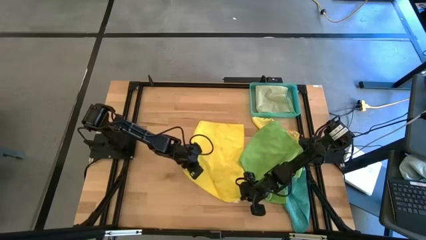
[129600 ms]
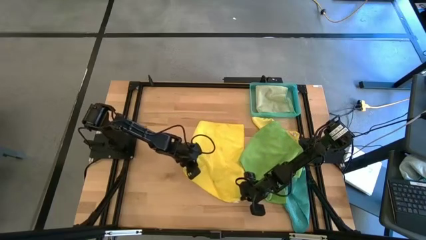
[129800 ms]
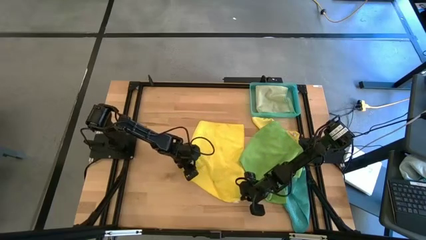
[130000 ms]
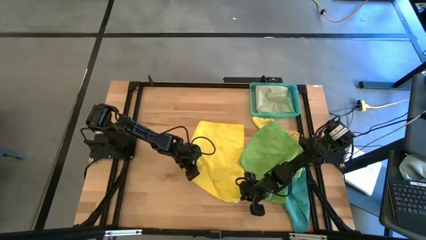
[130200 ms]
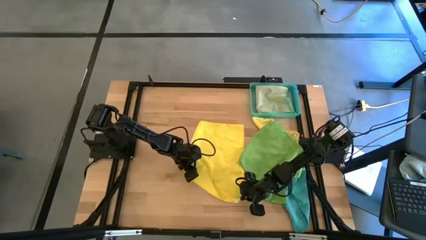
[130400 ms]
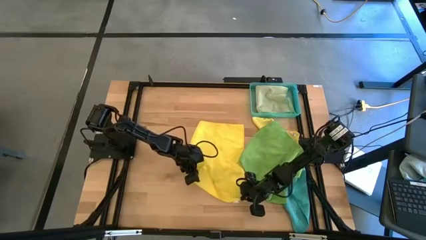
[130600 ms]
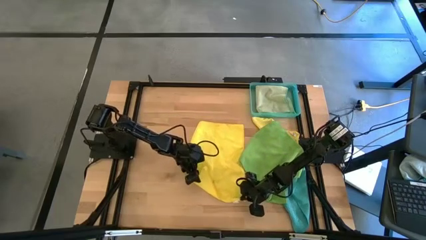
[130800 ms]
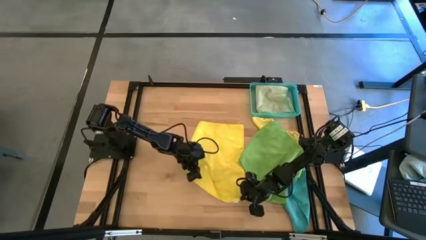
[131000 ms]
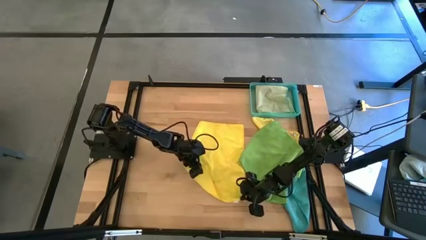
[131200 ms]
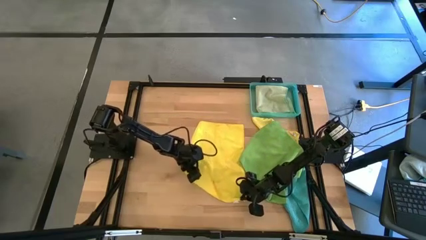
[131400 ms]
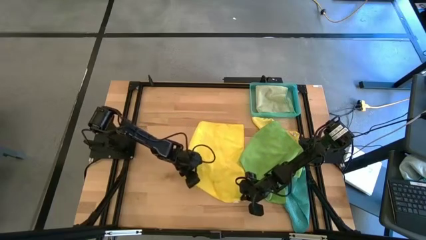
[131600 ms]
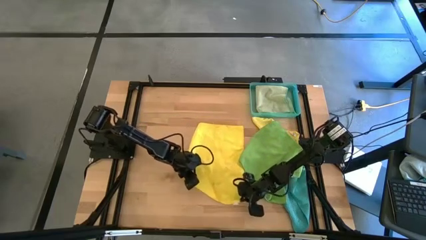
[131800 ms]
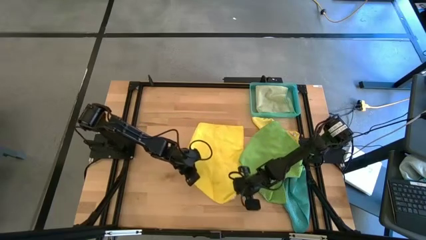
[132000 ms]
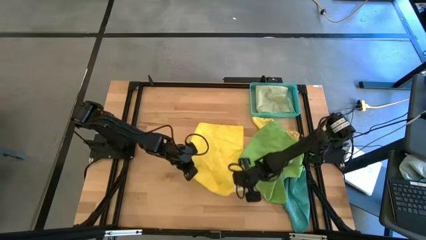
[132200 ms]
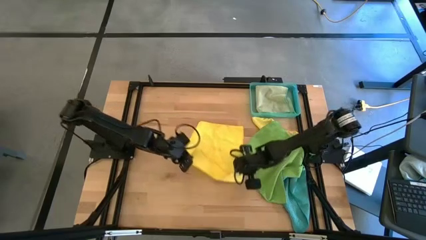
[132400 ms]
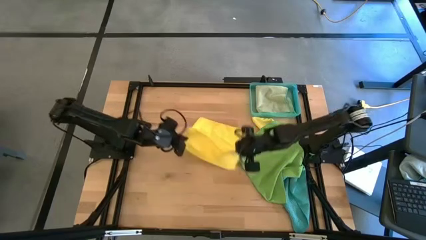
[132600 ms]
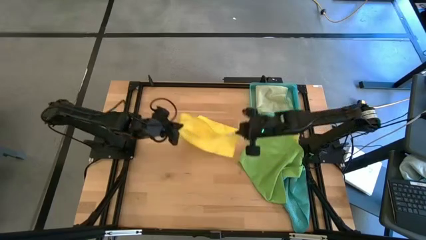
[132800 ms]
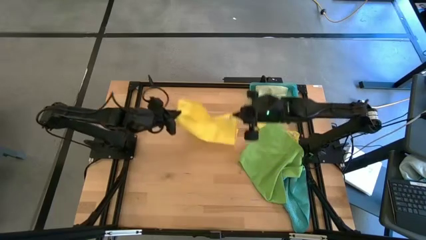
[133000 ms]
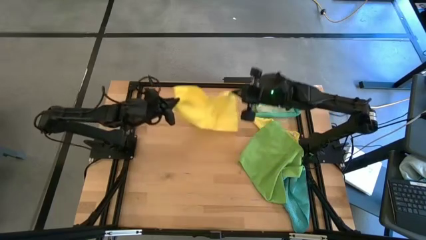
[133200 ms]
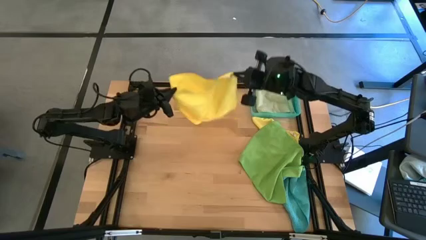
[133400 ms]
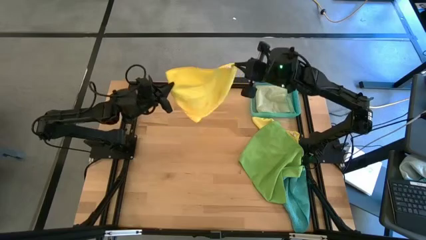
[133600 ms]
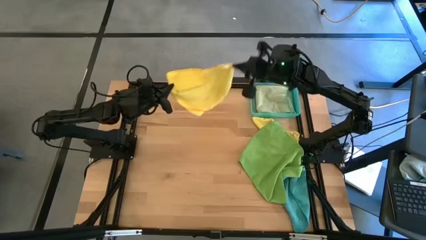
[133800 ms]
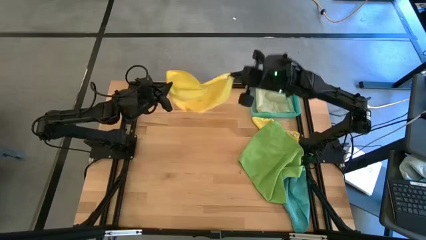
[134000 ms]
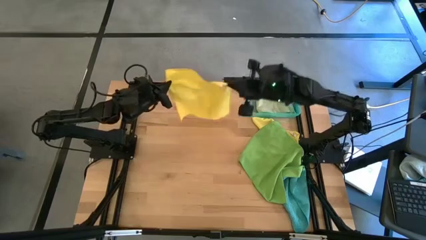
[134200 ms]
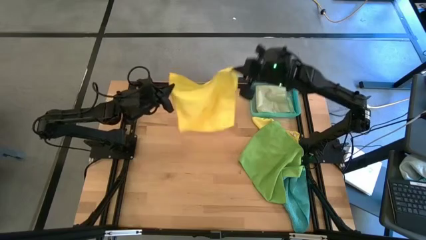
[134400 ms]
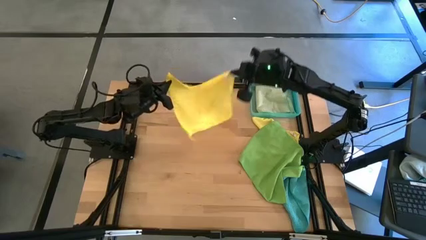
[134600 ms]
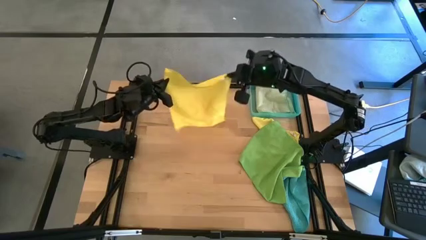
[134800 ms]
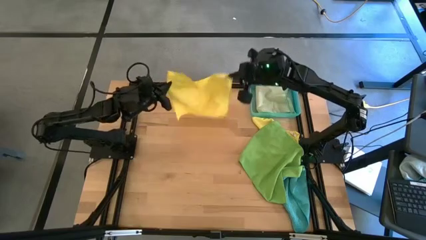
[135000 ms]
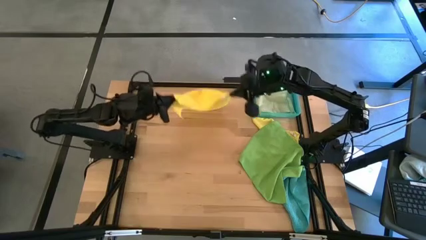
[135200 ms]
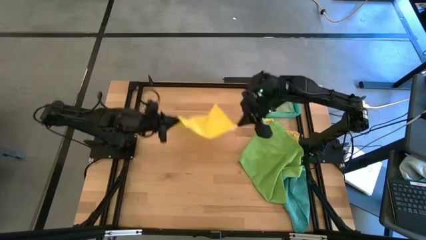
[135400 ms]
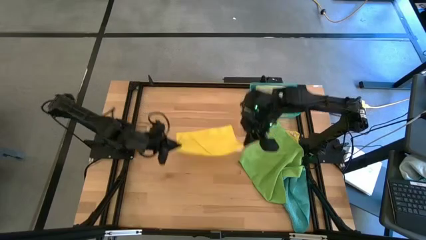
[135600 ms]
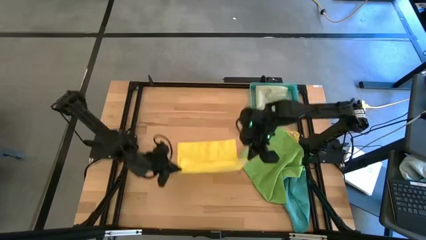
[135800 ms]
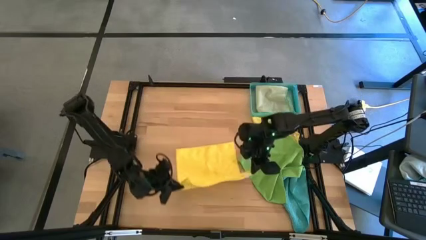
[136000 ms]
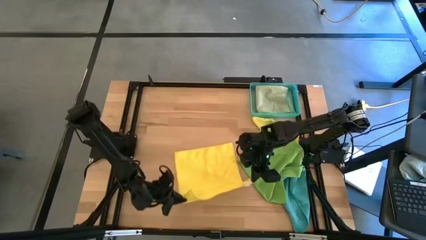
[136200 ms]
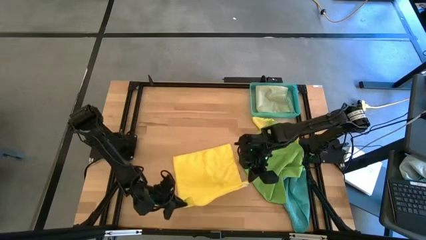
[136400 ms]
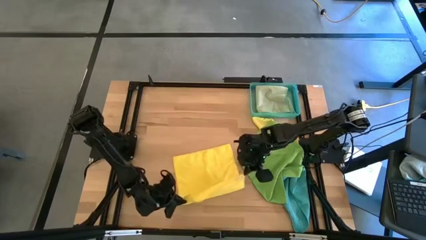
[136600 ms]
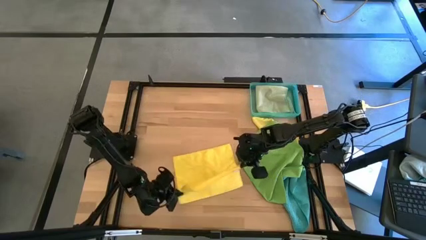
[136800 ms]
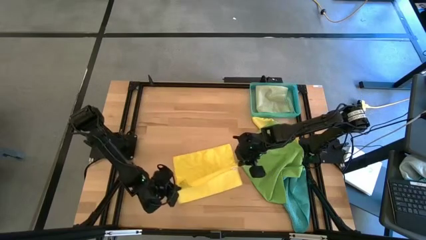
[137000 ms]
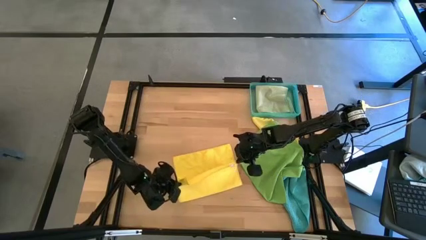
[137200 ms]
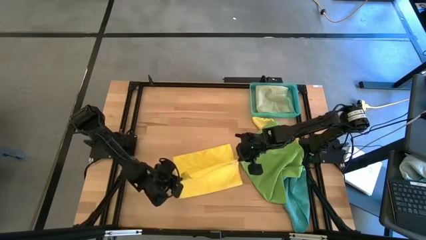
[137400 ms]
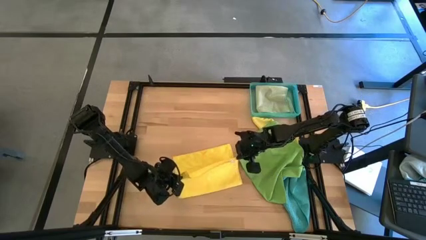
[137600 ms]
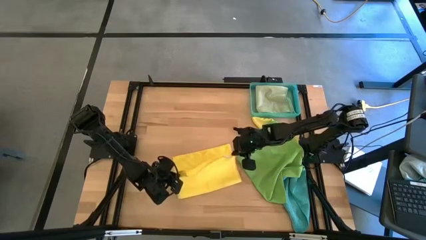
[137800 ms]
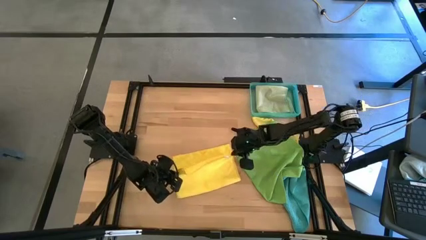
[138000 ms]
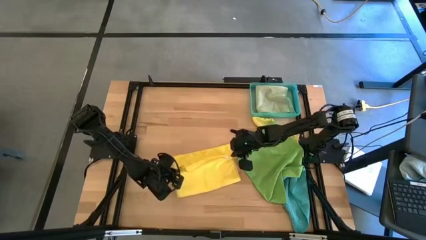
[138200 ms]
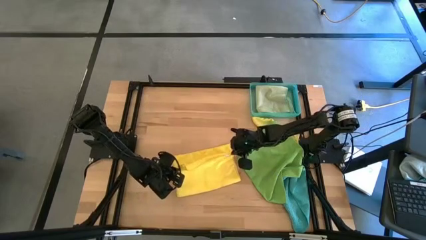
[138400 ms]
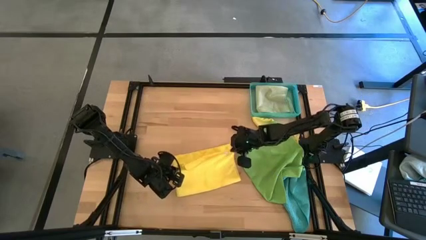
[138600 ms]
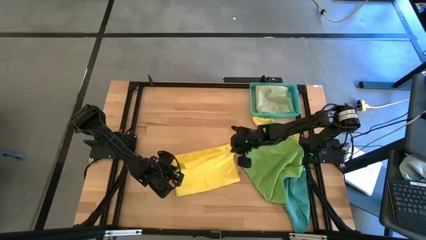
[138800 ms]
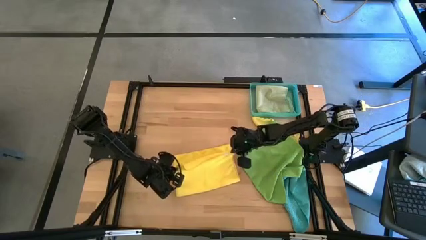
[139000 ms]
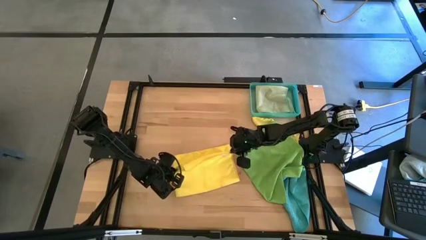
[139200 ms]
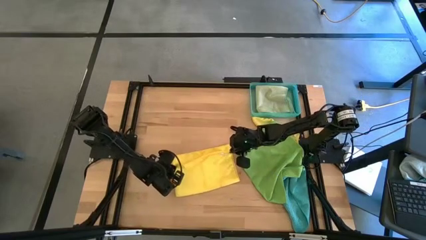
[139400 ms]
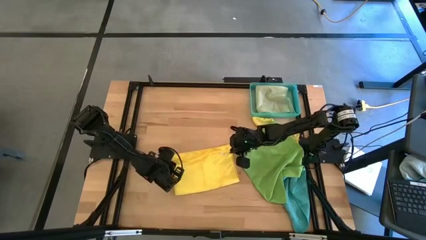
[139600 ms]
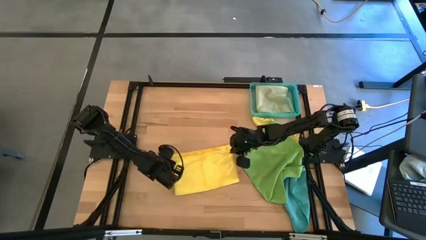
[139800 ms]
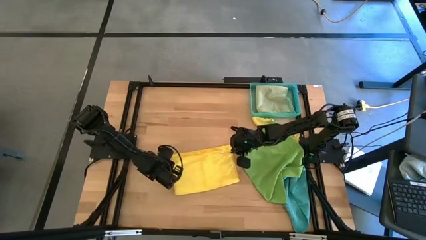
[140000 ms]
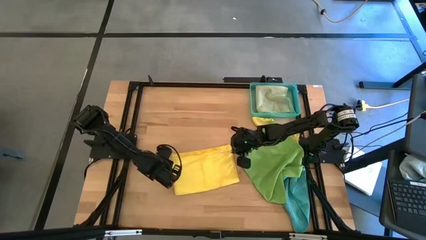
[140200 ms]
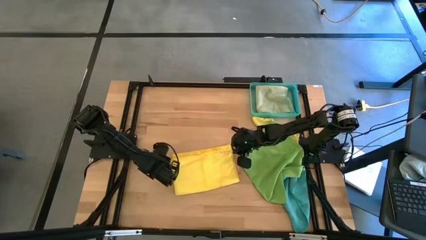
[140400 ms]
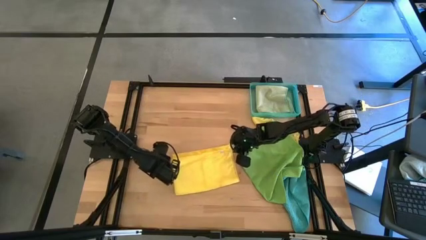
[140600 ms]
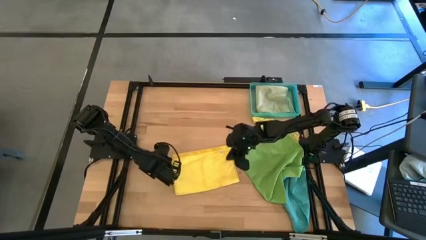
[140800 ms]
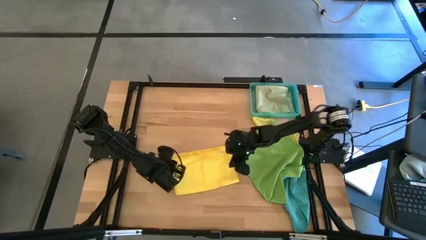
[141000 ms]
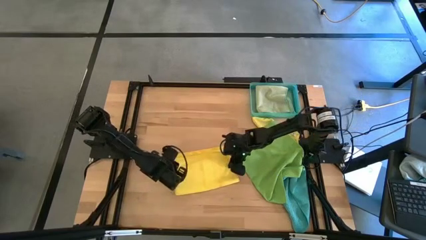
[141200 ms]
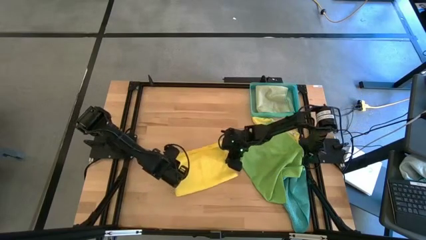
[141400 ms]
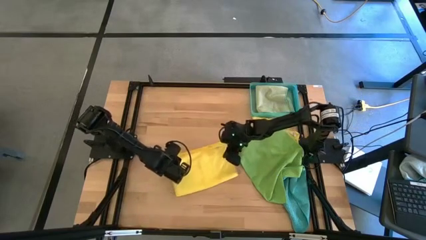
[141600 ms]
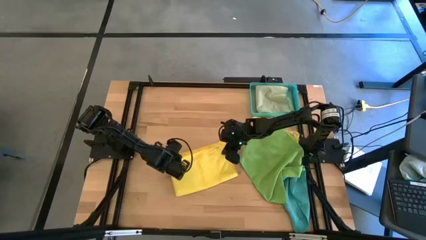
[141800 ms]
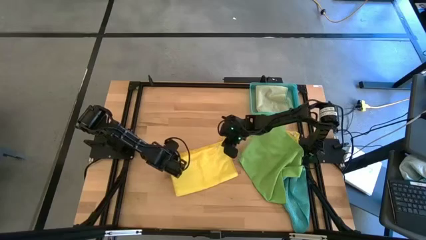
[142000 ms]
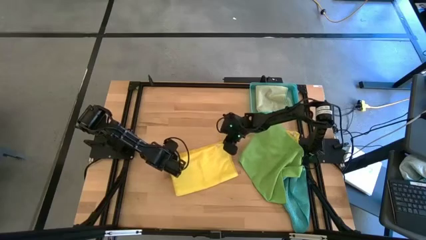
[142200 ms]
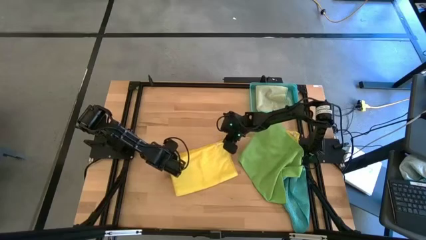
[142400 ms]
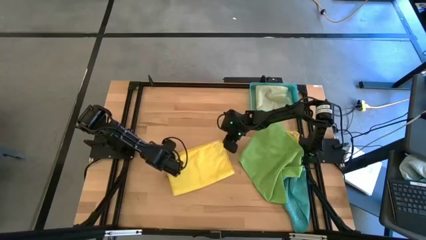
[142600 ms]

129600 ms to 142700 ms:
Task: Fold microfiber towels
Fold the left yellow microfiber cloth
